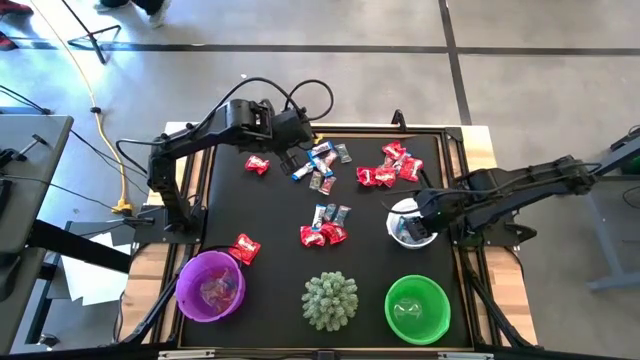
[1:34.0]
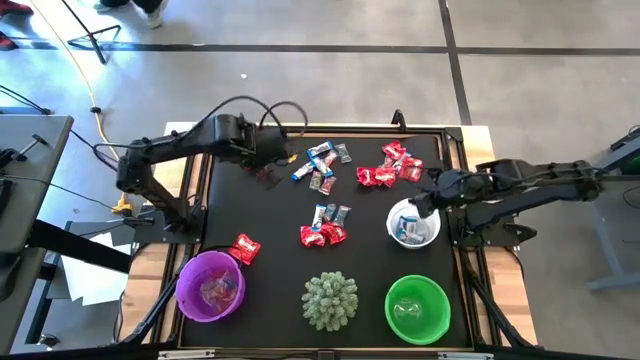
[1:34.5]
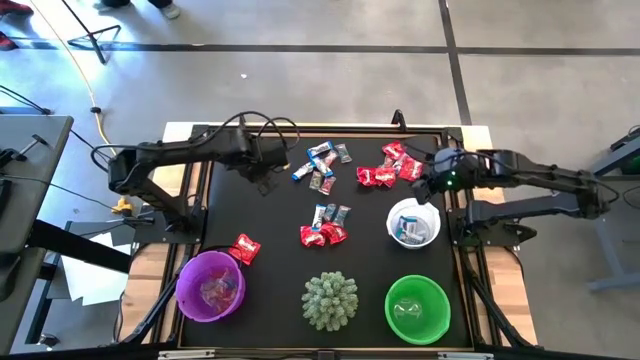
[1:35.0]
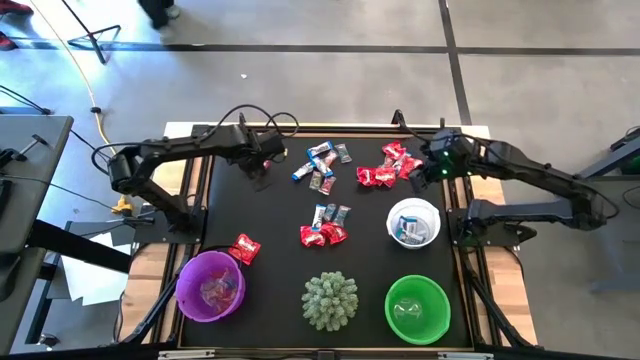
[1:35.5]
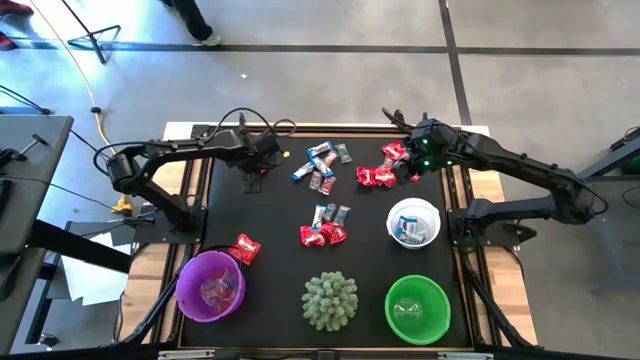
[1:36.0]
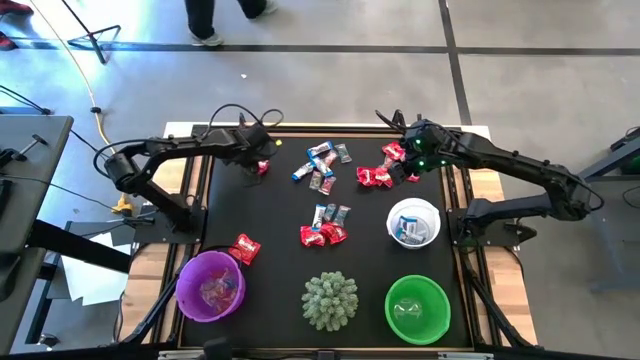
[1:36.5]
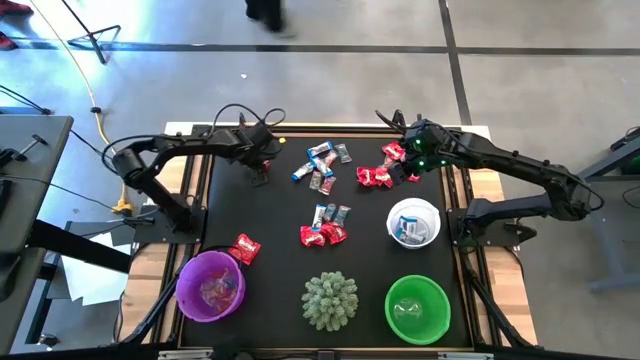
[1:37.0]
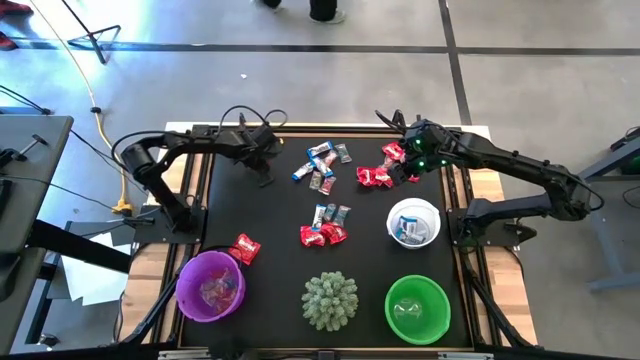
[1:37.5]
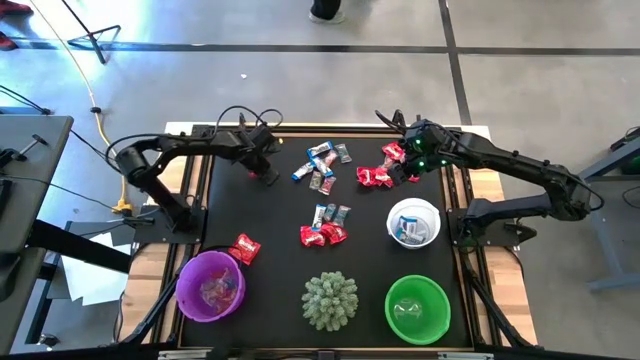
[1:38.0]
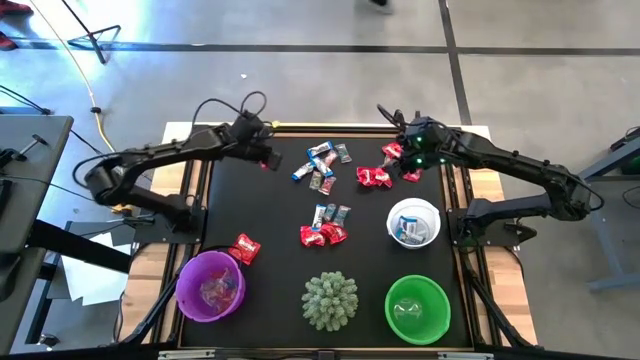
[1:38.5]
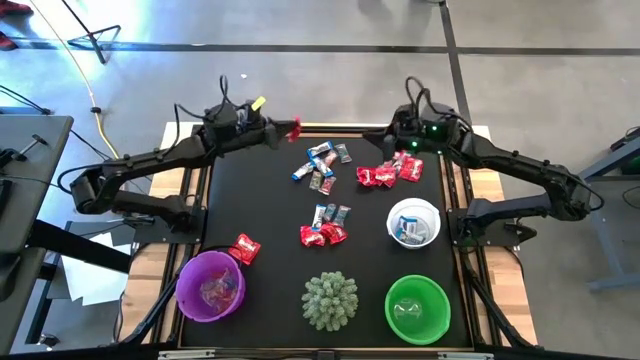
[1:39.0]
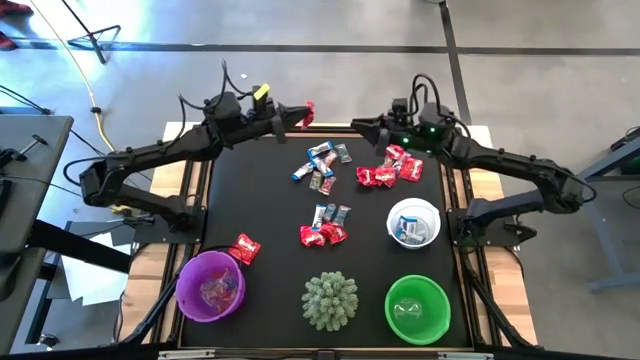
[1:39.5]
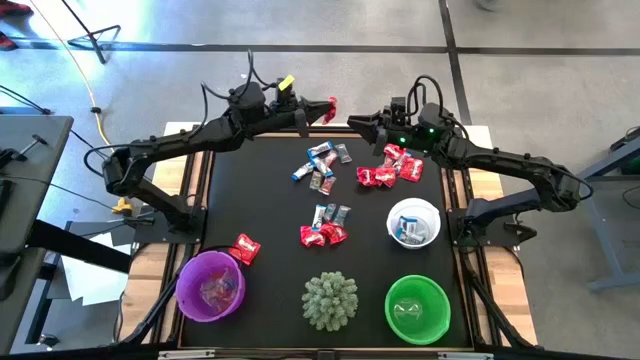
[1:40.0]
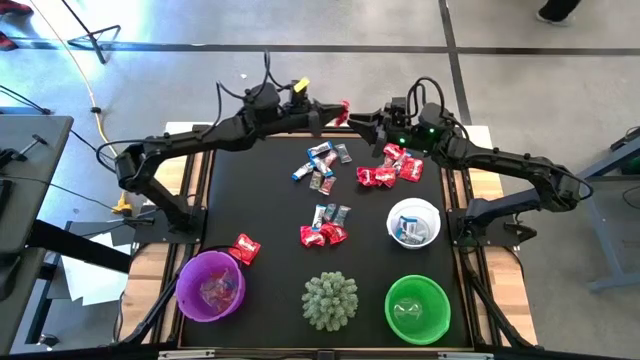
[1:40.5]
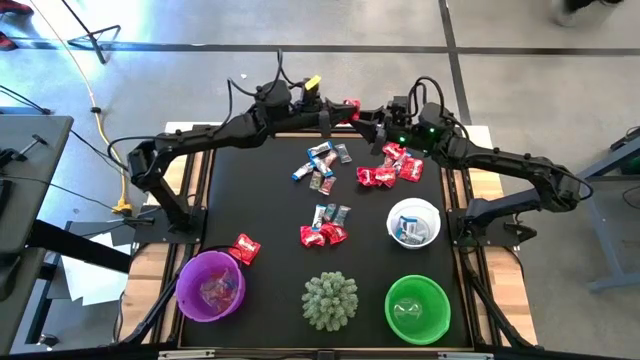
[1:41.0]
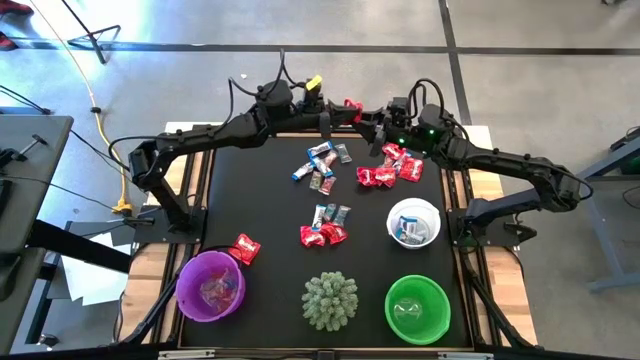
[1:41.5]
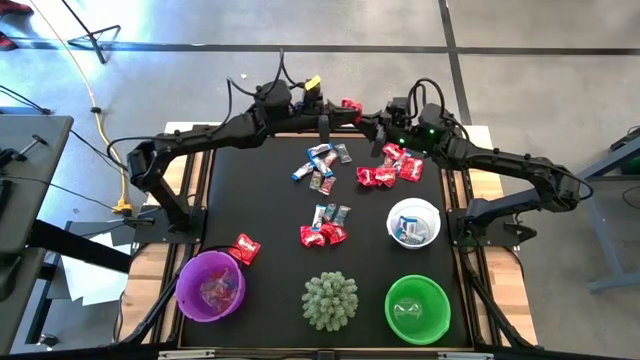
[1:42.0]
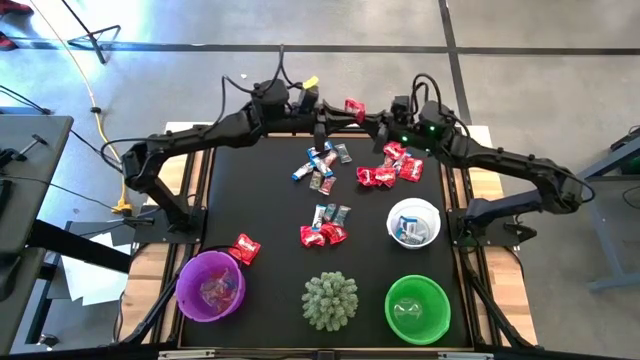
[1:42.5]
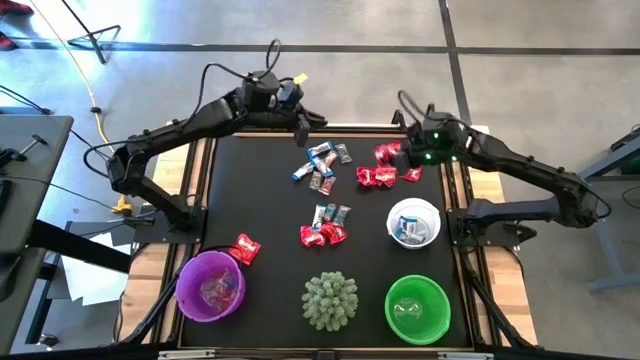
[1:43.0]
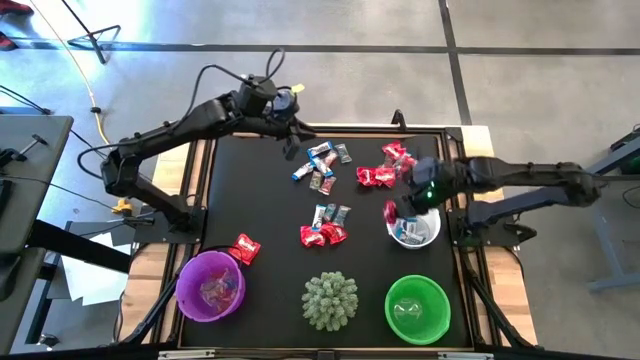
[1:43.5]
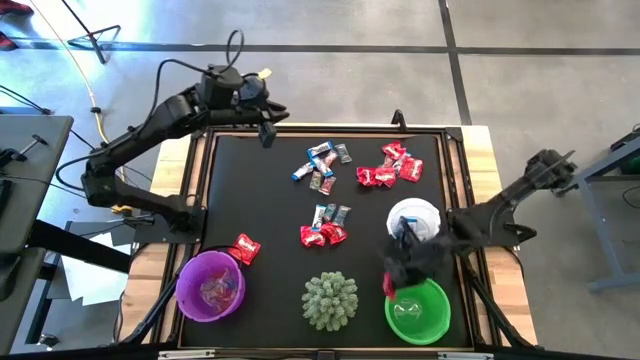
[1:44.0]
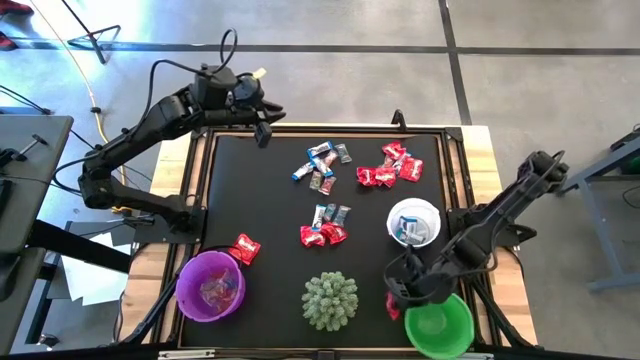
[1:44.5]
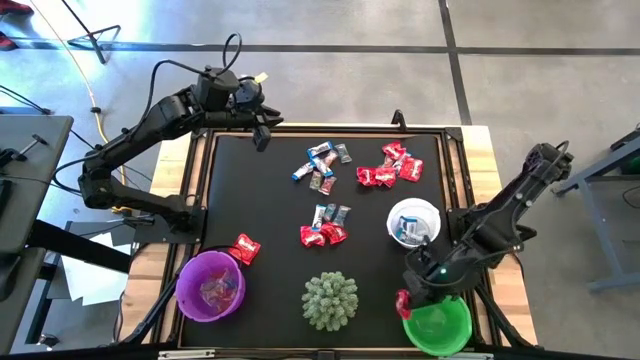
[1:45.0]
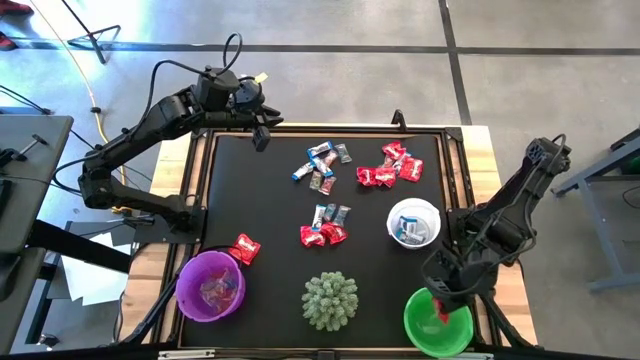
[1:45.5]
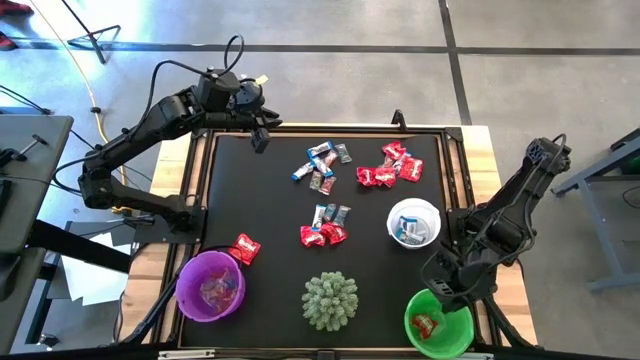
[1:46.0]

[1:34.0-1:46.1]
Task: Sort candy
Put the red candy wrapper into the green bucket

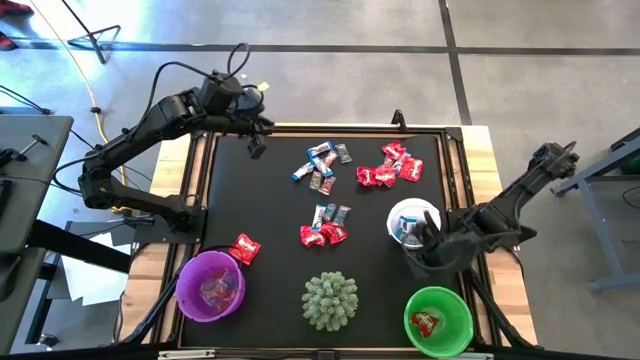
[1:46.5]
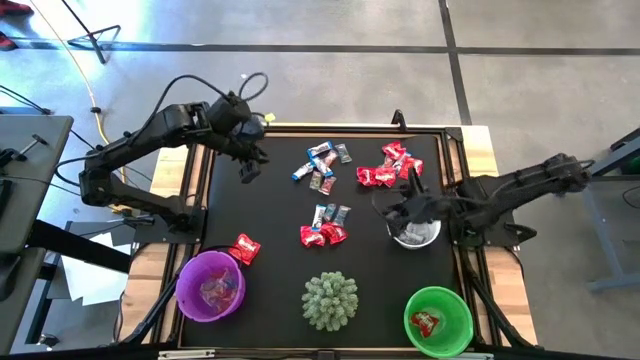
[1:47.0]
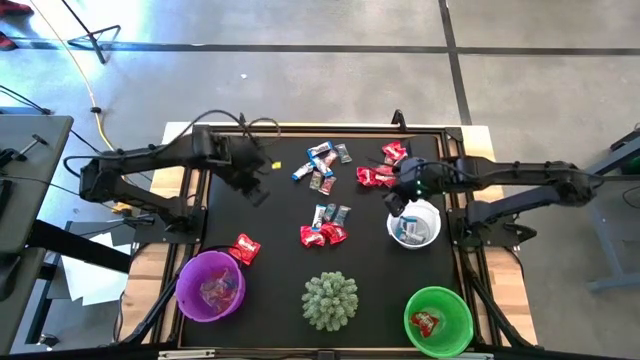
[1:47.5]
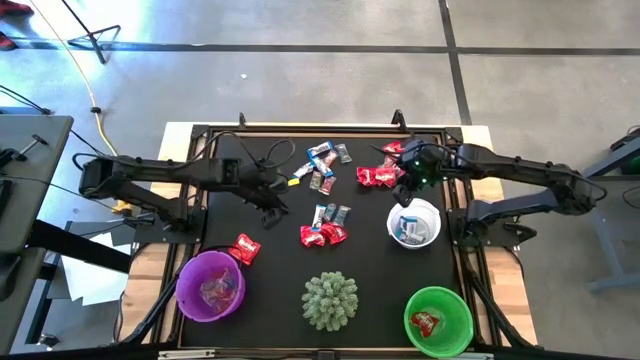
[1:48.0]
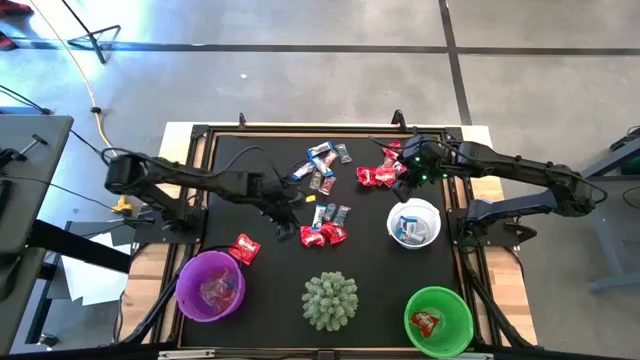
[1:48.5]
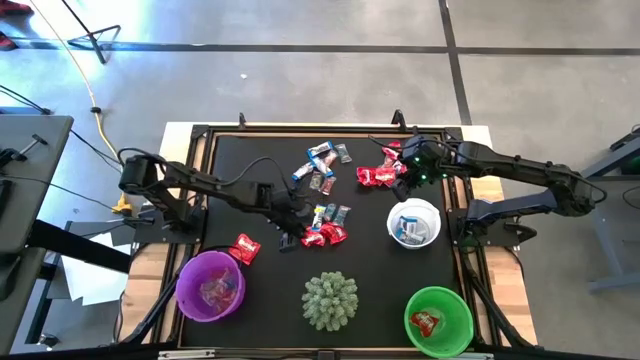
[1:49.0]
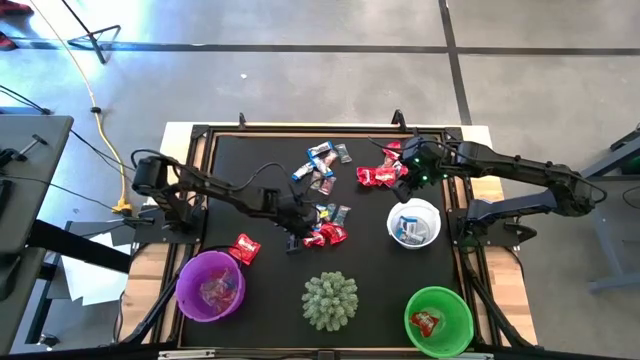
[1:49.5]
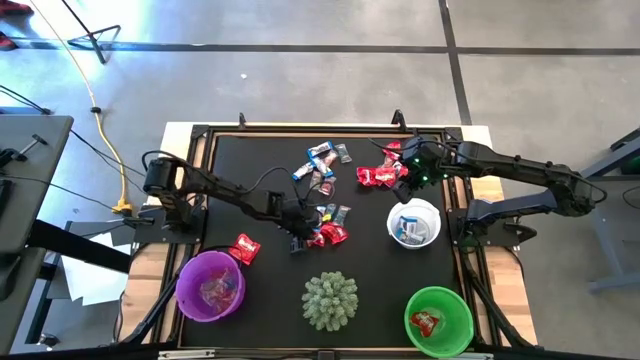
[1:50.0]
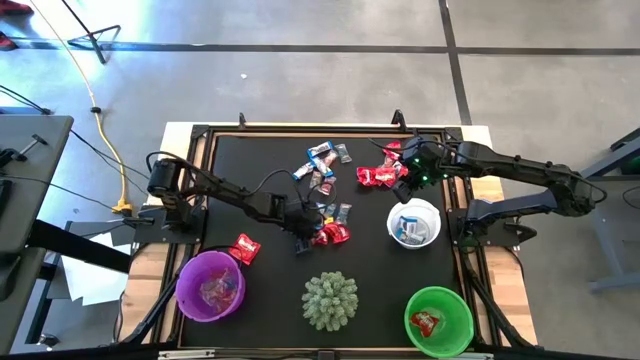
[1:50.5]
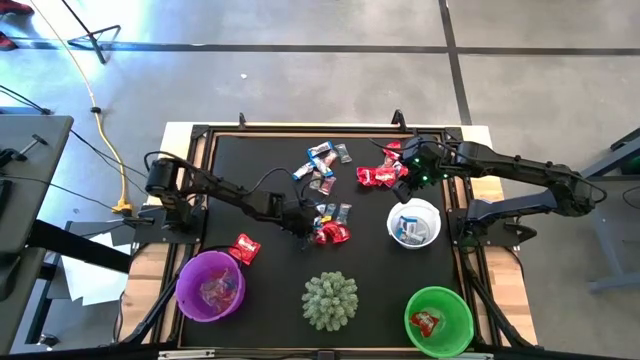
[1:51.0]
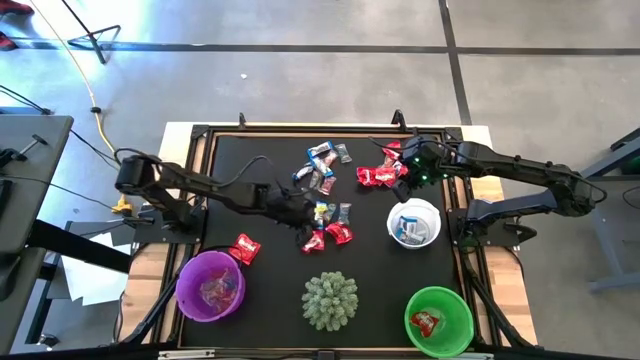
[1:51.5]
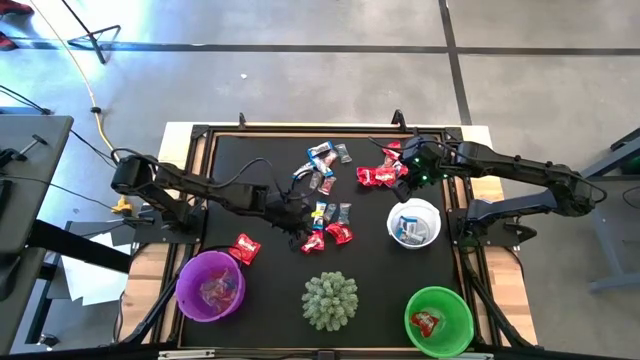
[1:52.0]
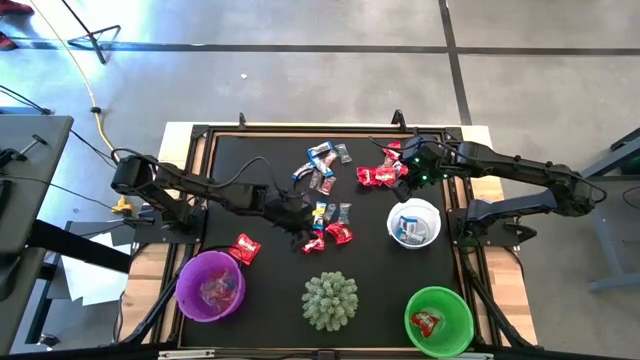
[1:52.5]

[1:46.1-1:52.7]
Put the red candy wrapper into the green bucket

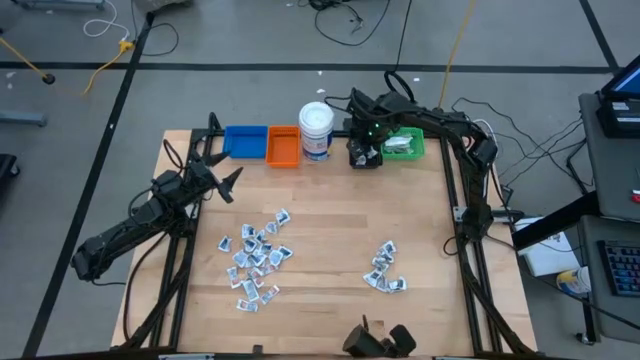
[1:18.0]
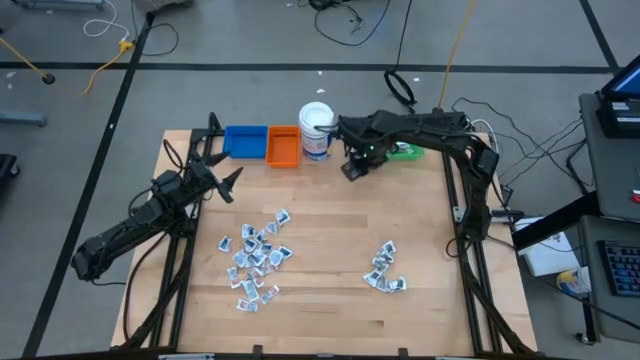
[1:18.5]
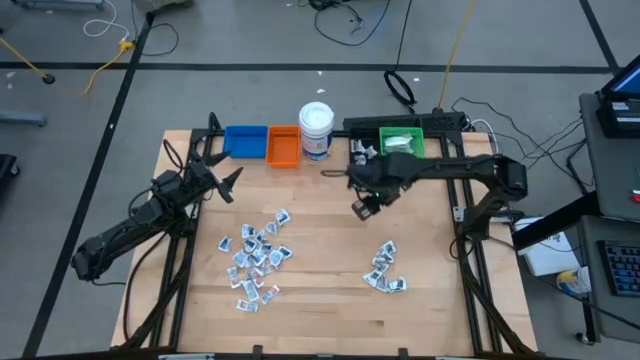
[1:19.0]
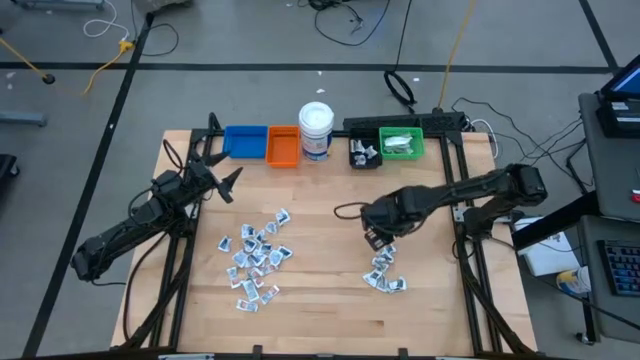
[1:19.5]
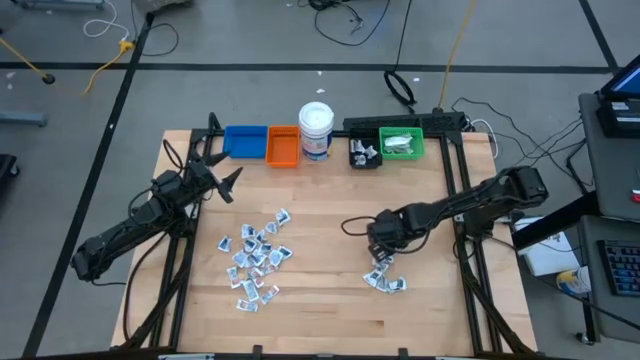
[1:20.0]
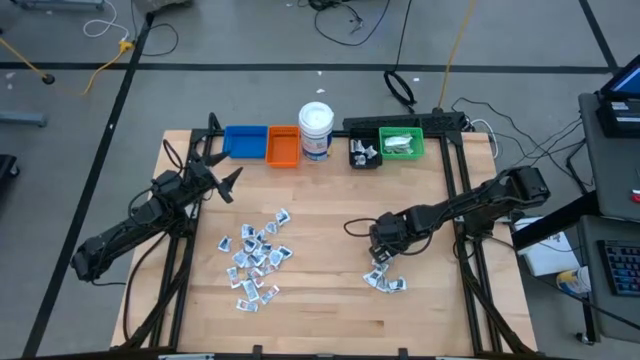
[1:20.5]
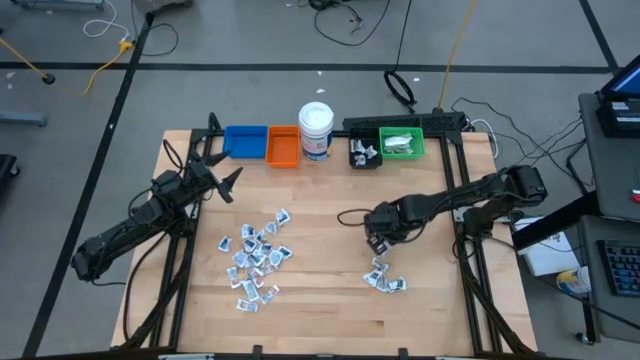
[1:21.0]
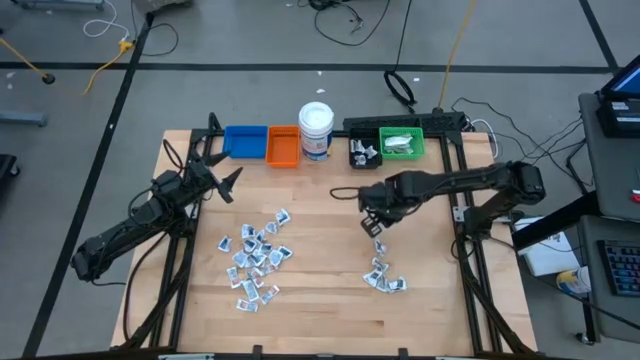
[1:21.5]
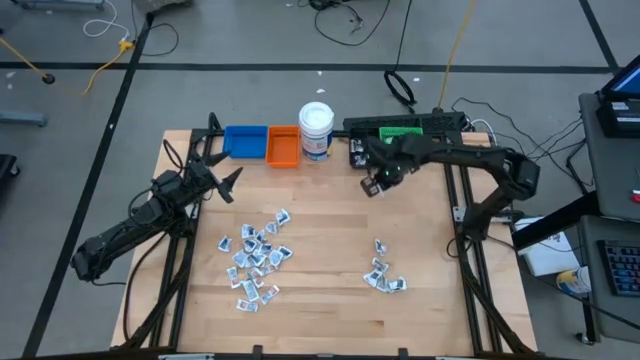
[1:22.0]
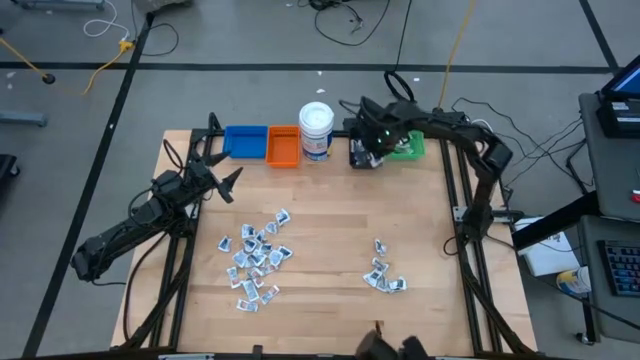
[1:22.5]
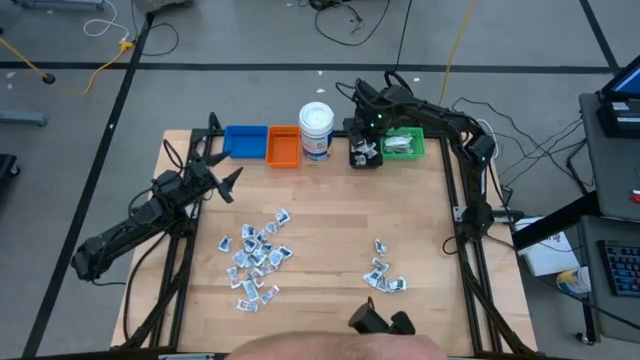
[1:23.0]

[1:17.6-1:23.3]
Task: Pick & Place First Aid Supplies
Put the towelette pack into the black bin
